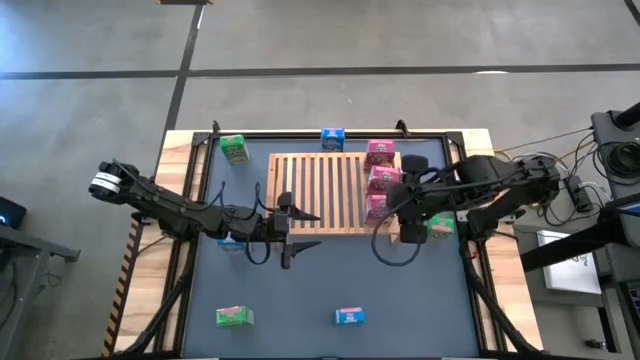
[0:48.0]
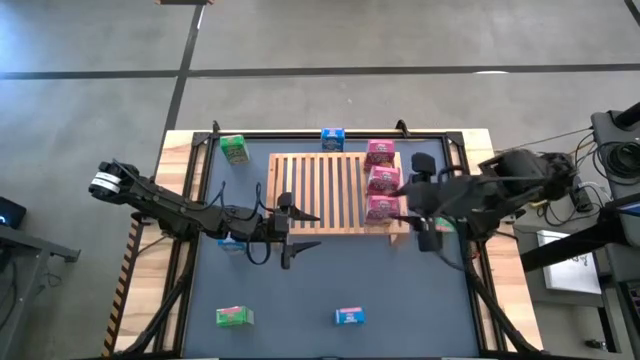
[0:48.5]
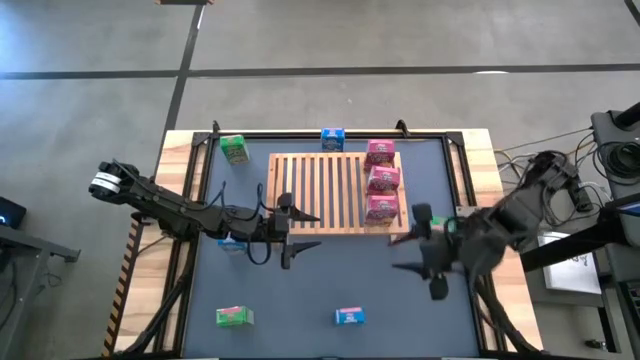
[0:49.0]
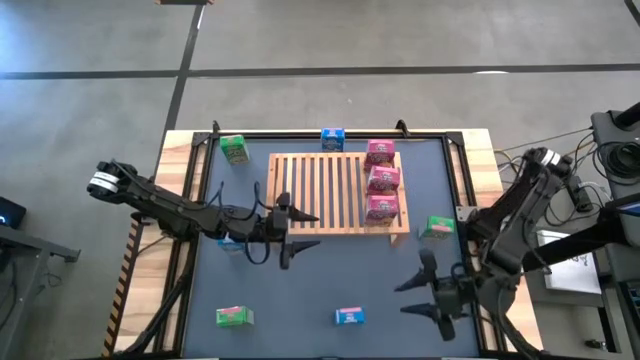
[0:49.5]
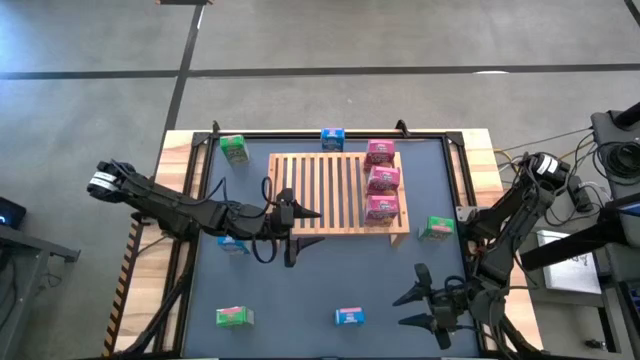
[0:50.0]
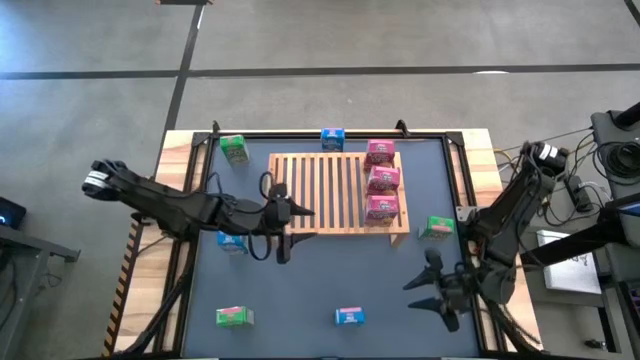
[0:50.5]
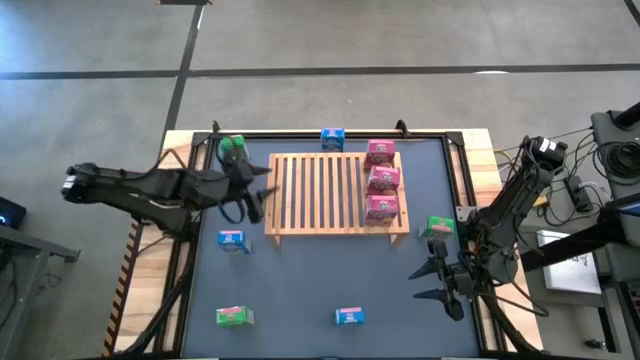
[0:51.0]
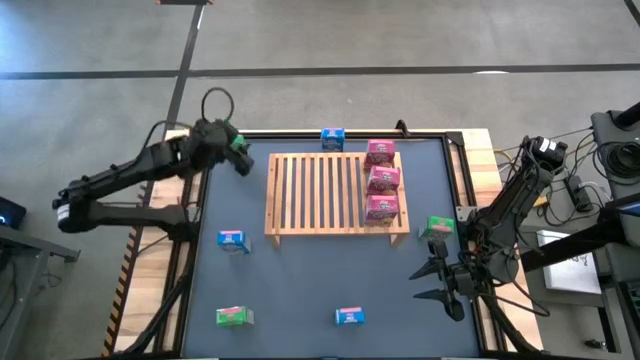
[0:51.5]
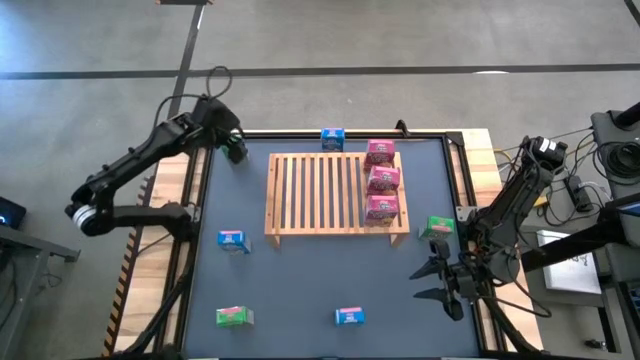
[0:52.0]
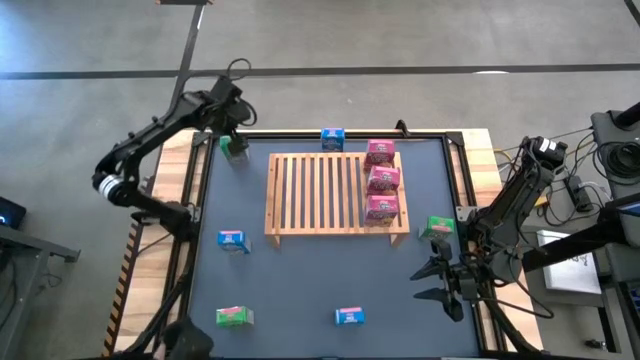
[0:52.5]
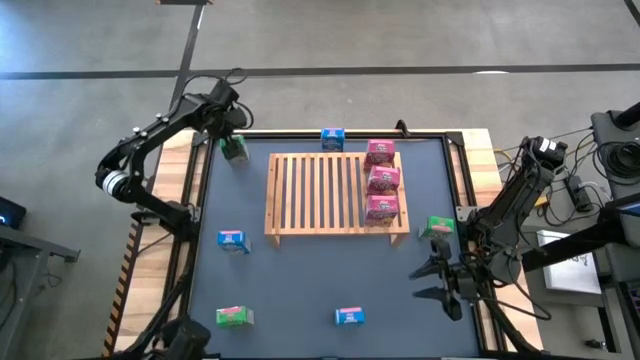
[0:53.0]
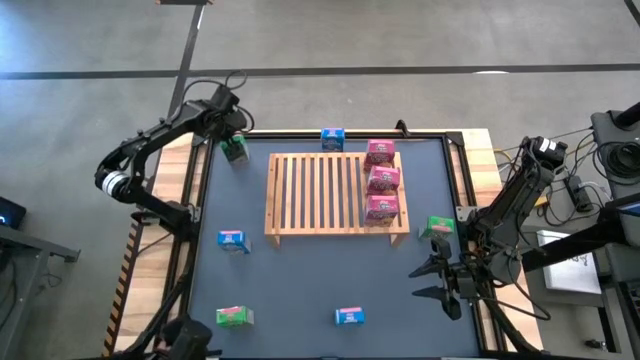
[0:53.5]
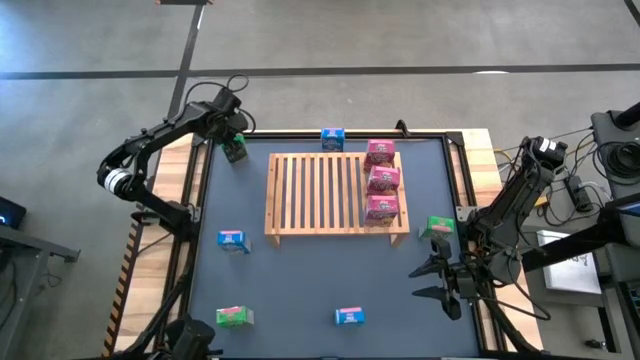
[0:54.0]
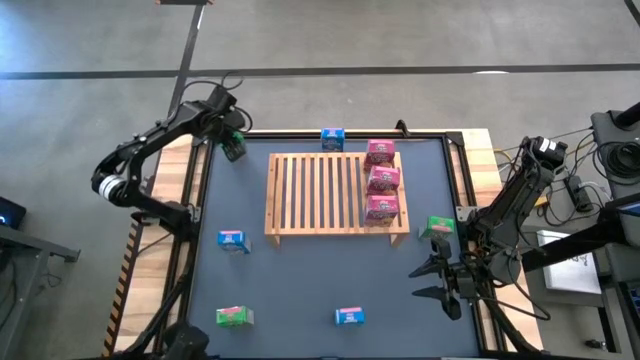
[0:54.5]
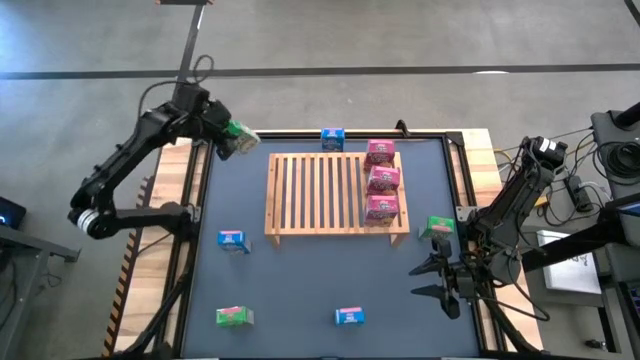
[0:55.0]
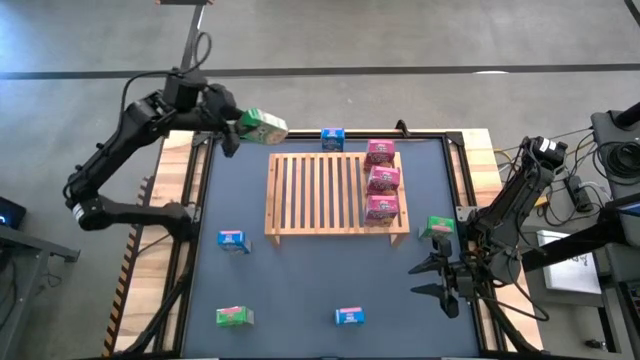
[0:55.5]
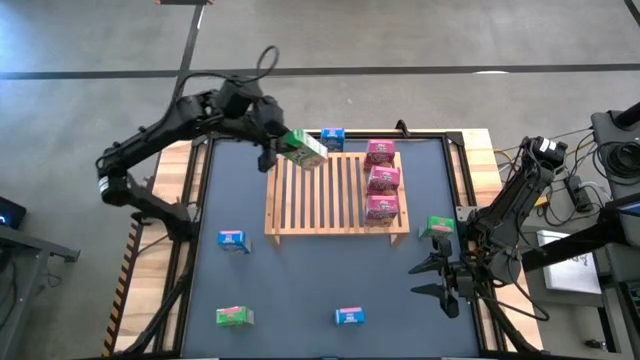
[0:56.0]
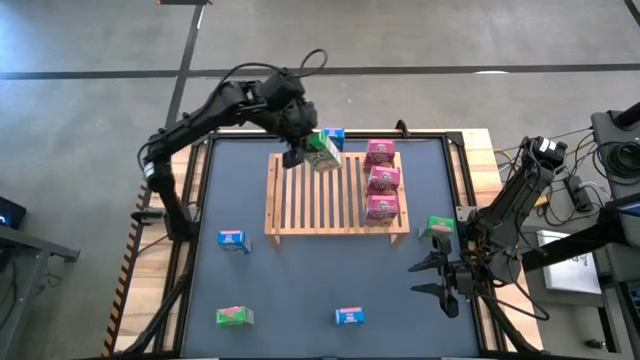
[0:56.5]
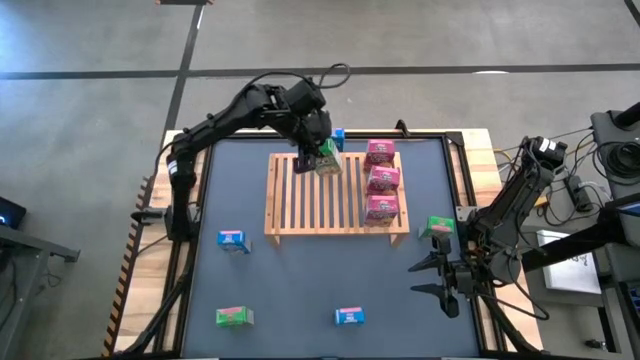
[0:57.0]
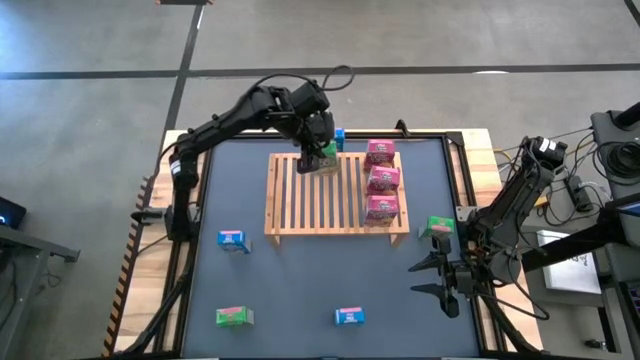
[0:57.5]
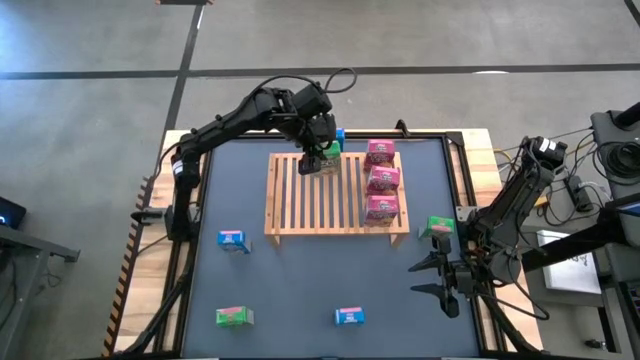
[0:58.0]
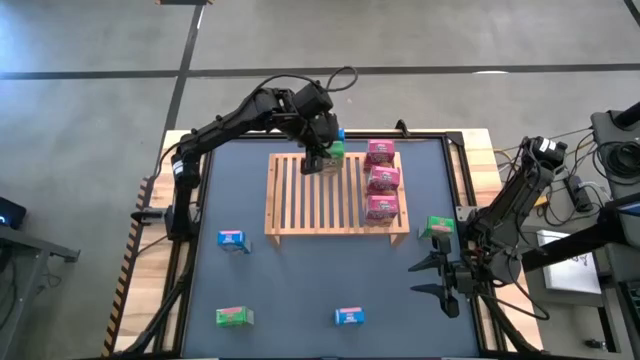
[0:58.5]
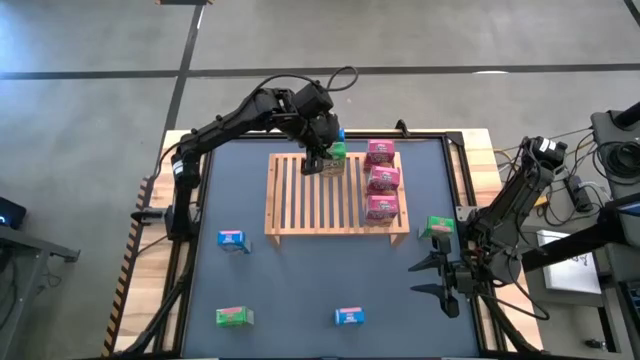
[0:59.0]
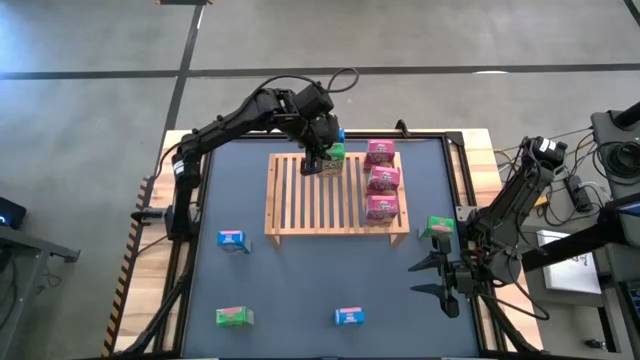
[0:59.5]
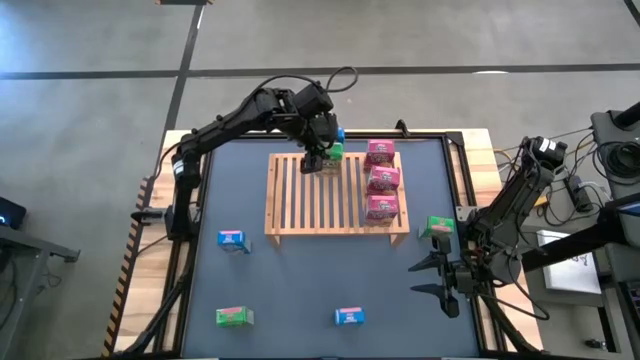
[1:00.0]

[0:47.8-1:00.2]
Task: Stack cereal on shelf
Put the top green cereal box on the shelf

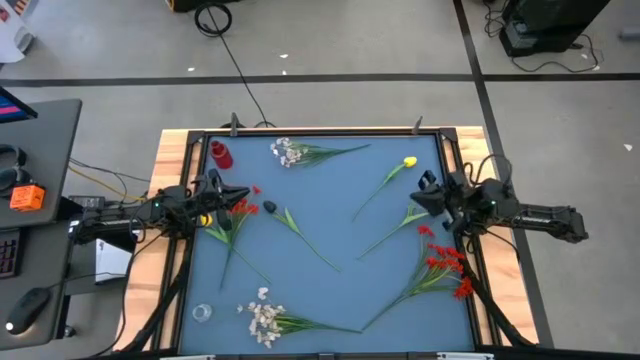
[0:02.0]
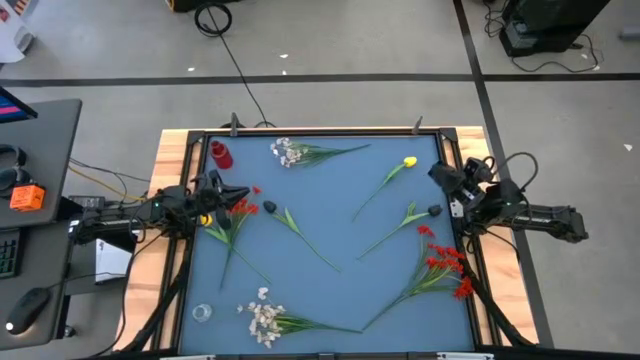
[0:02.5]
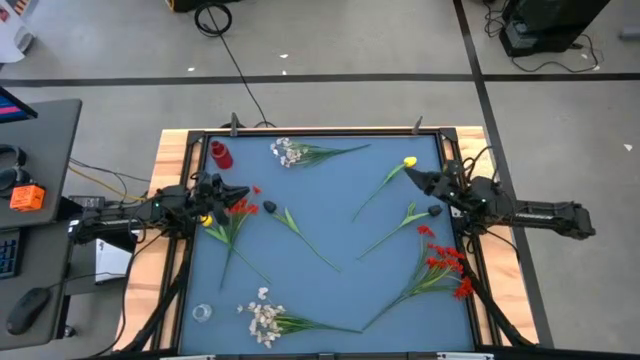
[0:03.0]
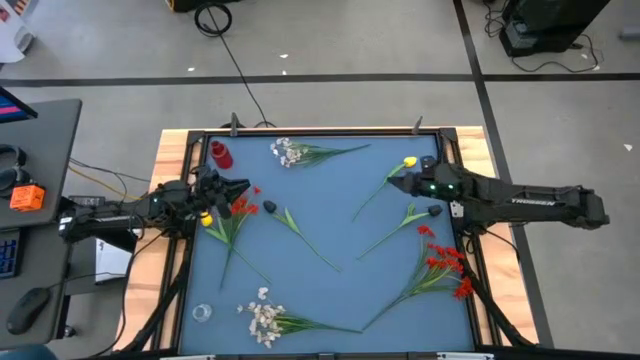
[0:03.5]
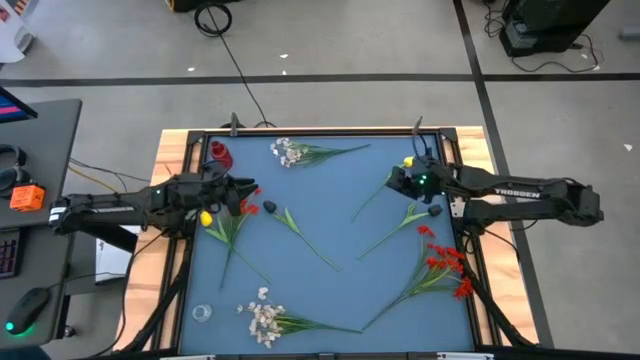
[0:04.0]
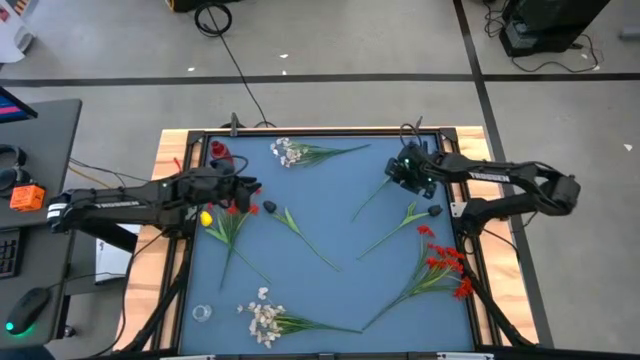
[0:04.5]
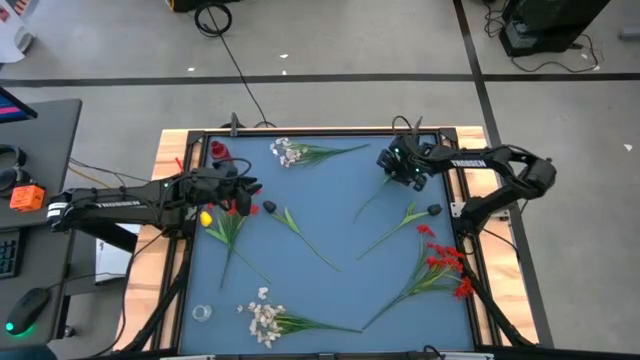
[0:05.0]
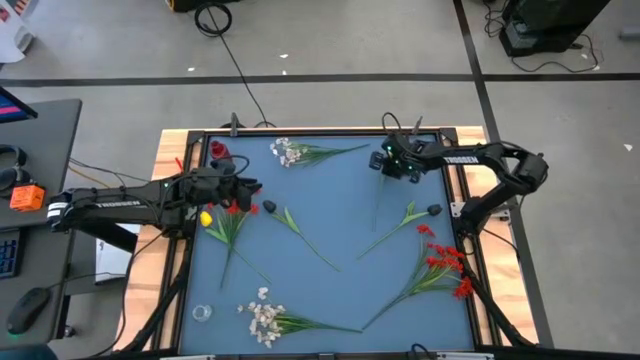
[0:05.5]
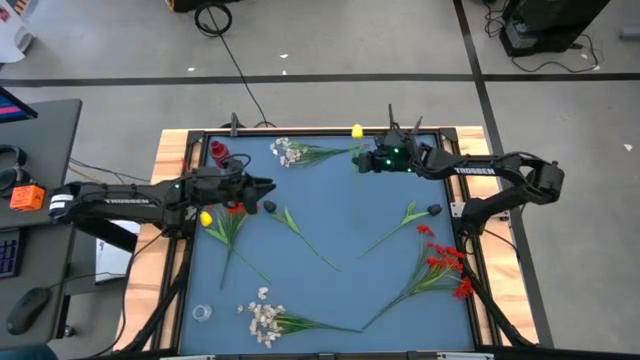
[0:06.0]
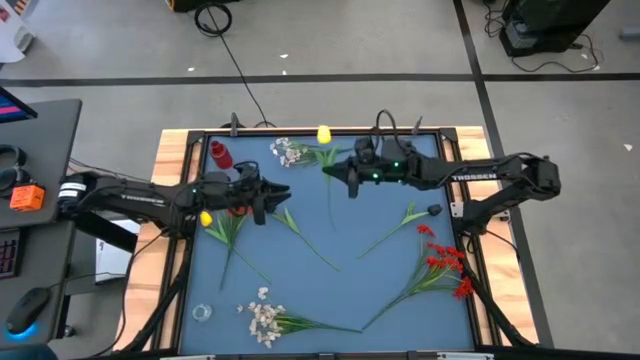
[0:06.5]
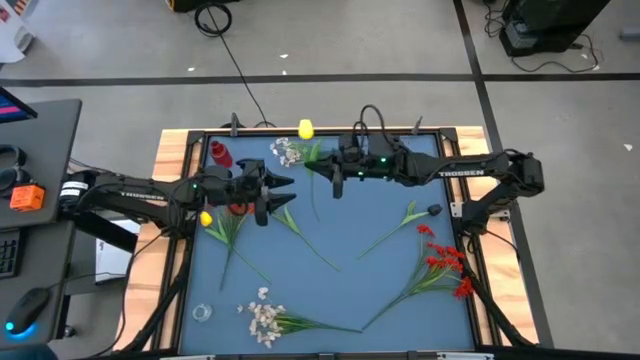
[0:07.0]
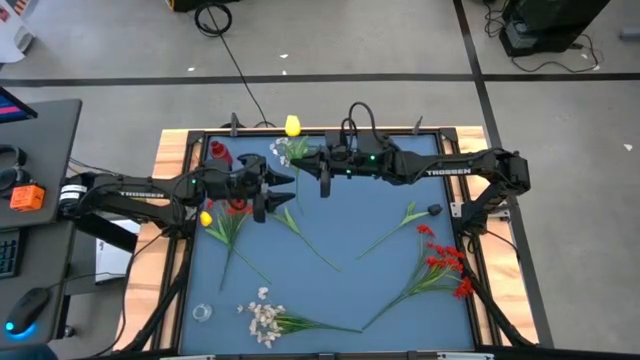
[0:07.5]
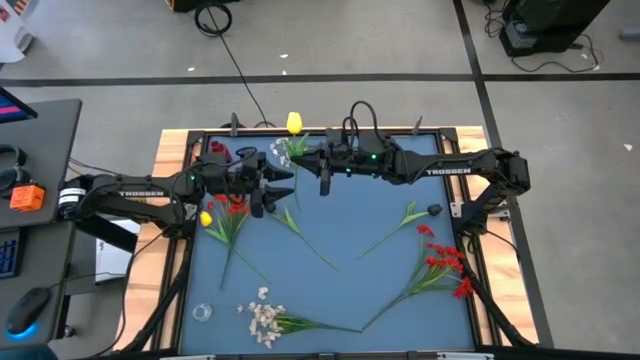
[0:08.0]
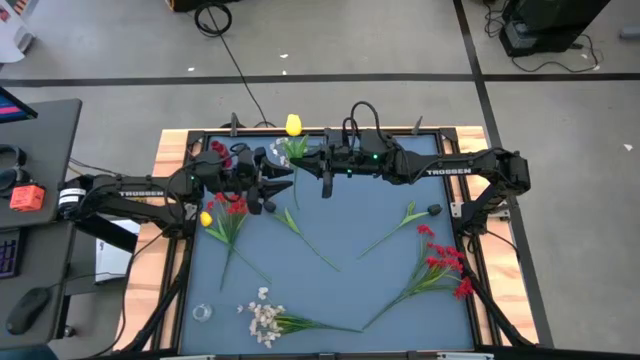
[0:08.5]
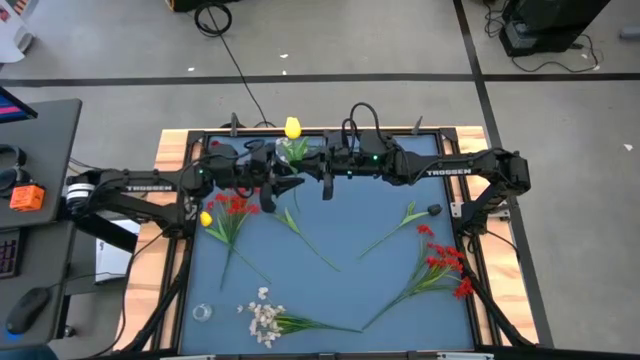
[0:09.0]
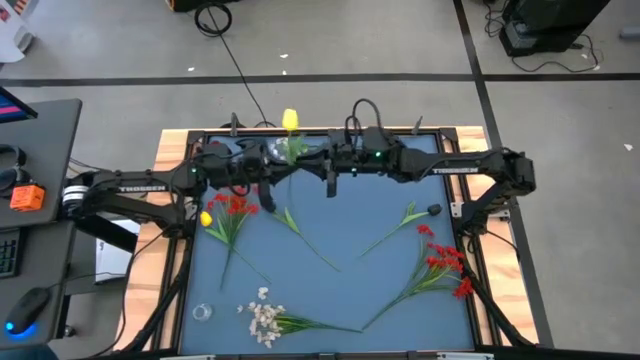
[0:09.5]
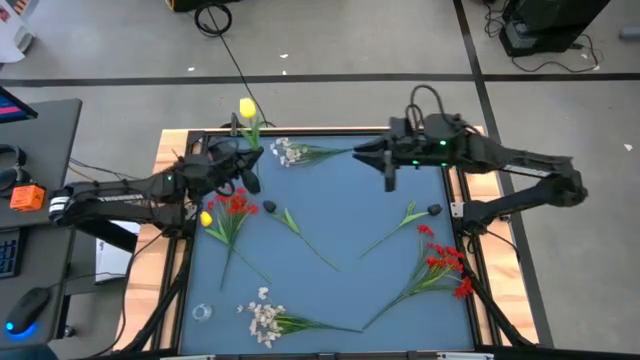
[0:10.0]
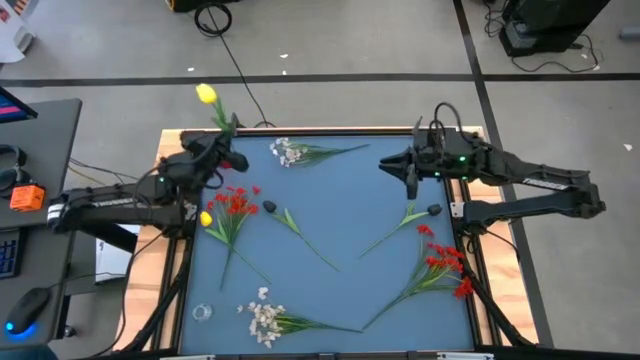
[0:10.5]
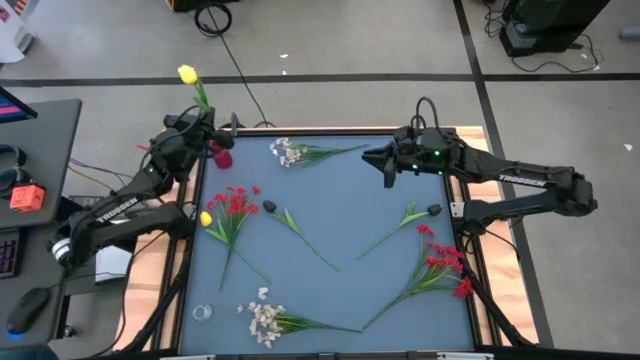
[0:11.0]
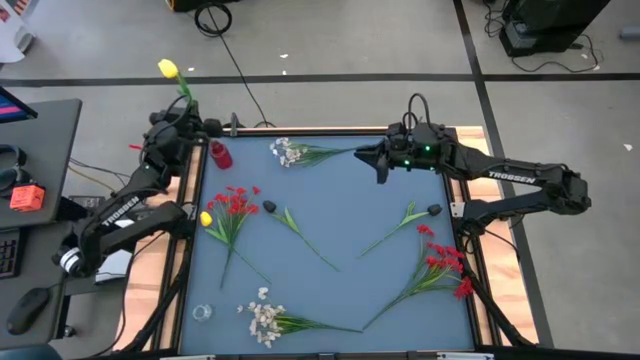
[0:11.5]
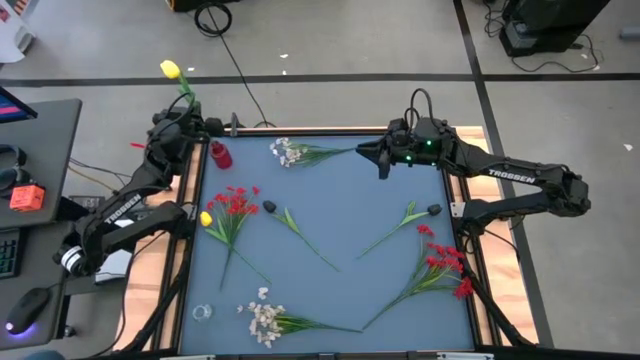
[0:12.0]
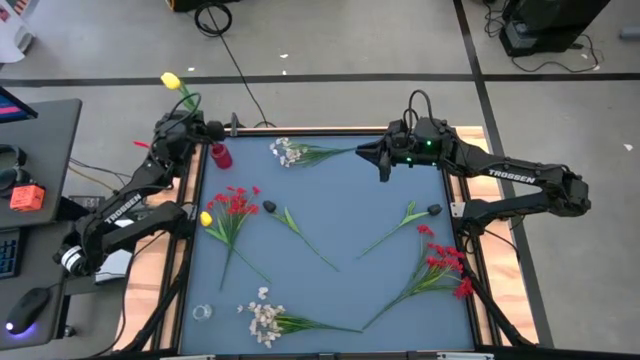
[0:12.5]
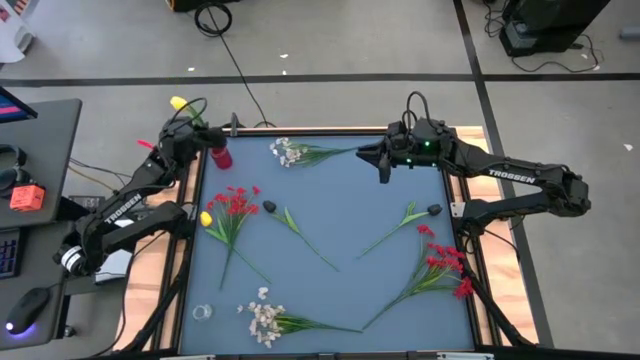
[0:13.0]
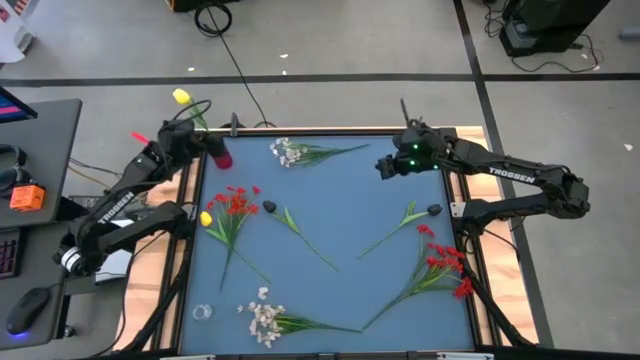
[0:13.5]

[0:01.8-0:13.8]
Task: Sort flowers into vase by color
Put the right yellow tulip into the red vase
